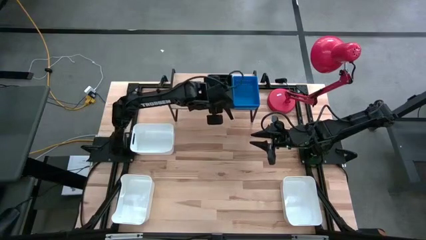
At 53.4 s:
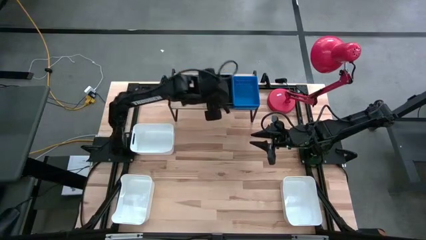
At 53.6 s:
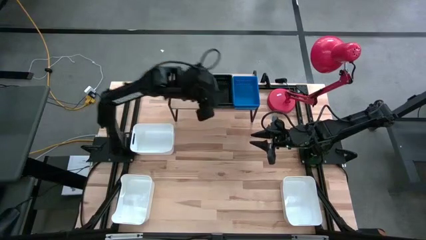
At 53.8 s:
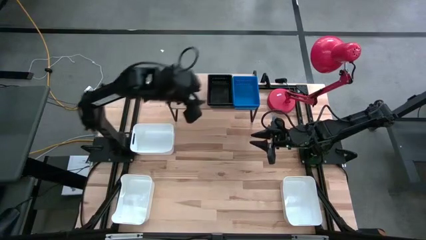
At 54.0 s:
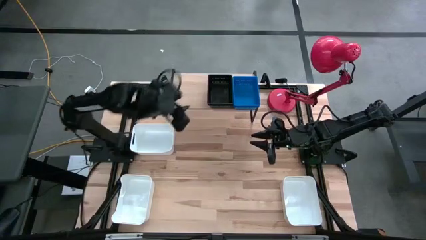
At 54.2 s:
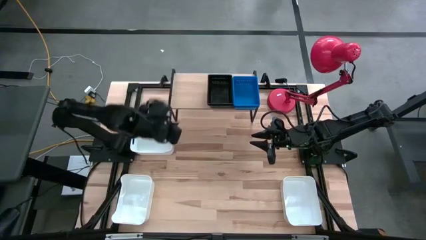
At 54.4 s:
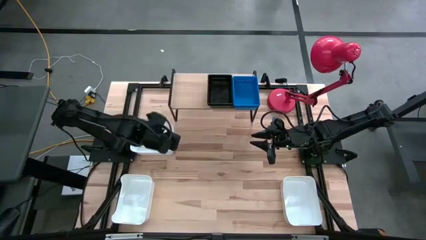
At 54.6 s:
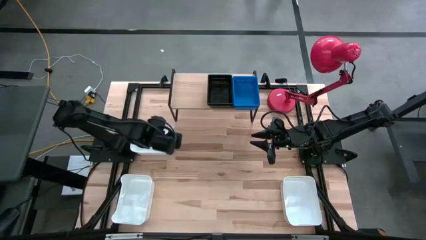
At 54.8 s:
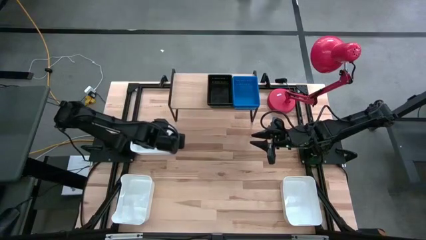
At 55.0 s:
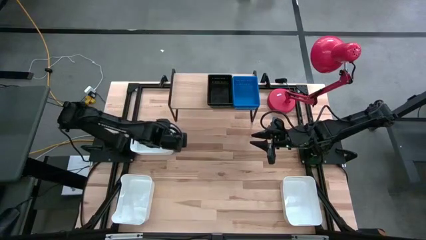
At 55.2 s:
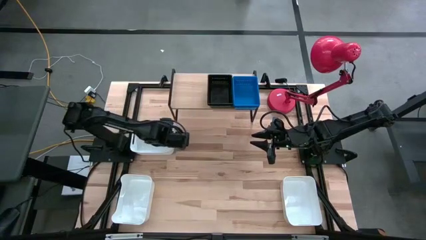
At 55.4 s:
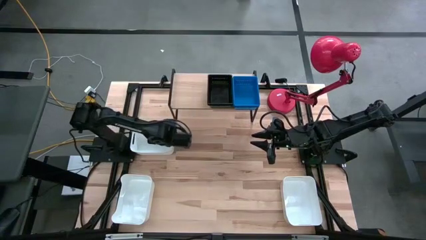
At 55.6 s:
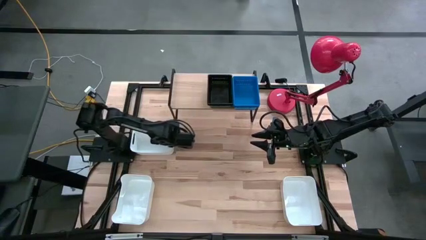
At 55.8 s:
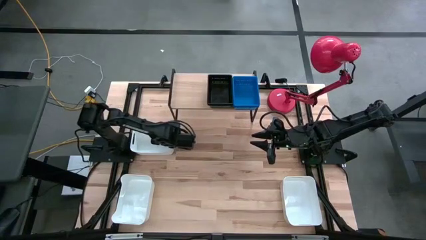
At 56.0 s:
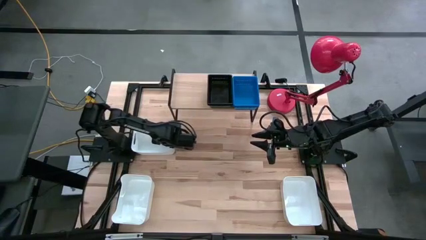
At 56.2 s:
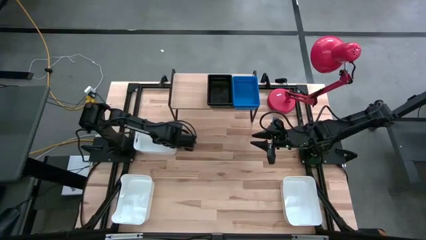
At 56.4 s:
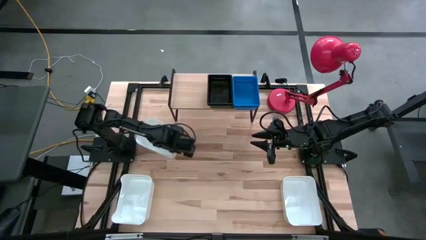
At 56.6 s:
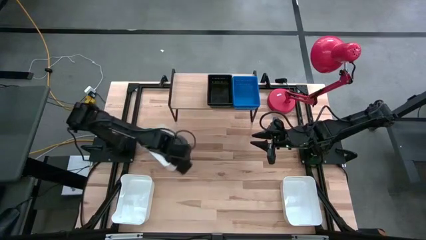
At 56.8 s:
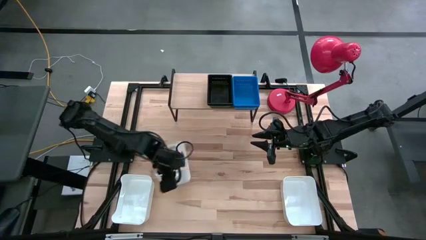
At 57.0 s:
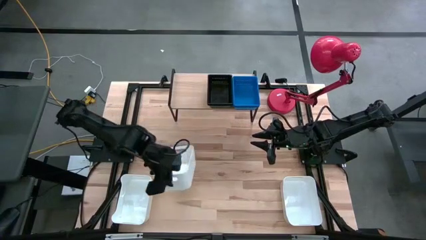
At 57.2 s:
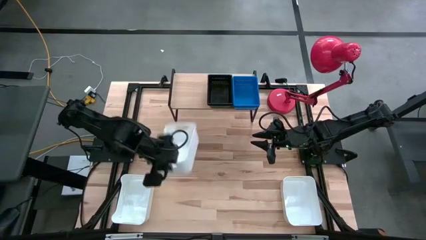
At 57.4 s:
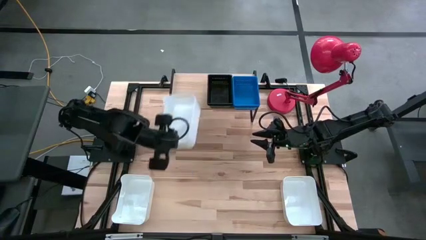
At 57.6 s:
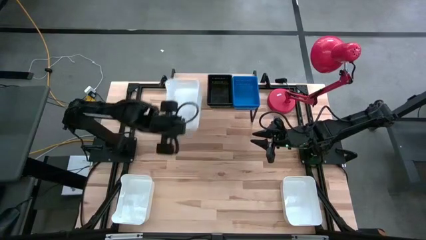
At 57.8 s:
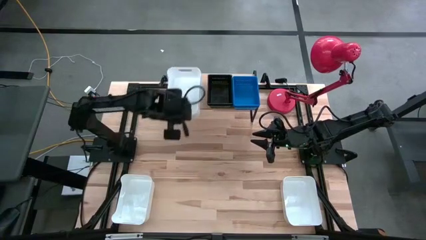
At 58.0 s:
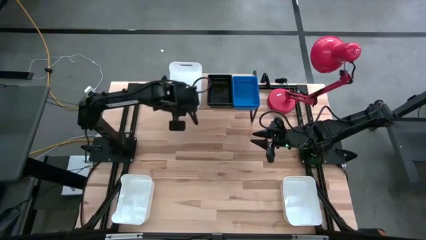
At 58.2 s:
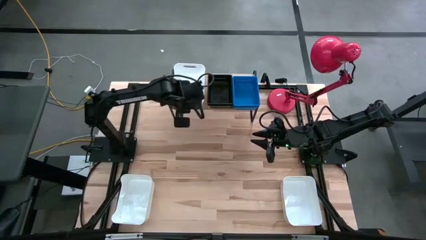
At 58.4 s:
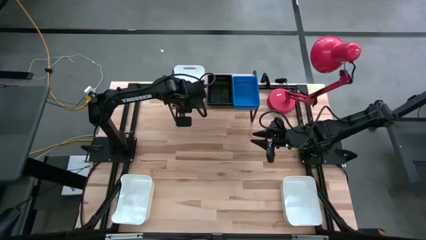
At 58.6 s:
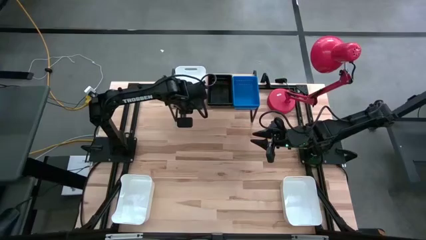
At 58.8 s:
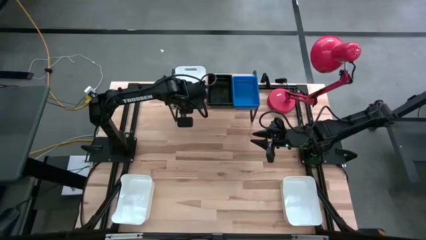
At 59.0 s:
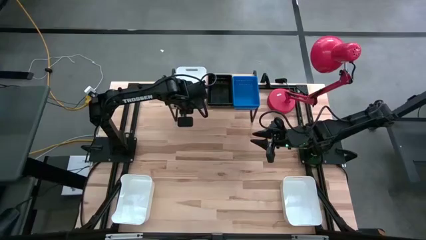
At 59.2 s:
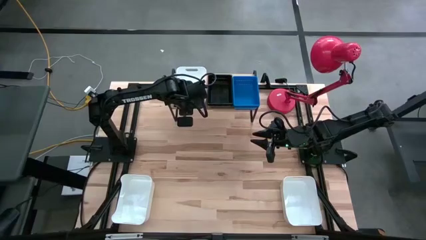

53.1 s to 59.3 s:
Task: Stack baskets on shelf by color
Put the top left white bin to the left on the shelf

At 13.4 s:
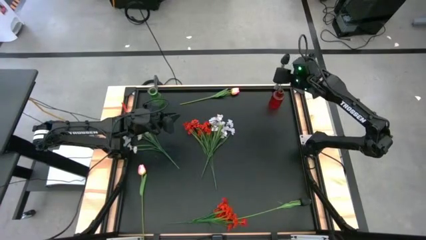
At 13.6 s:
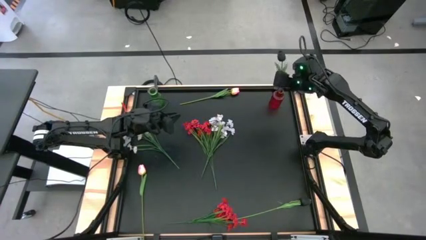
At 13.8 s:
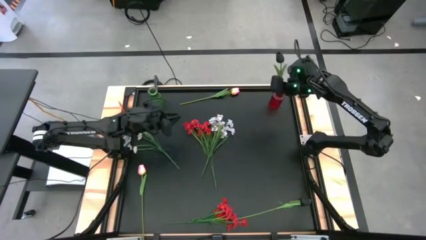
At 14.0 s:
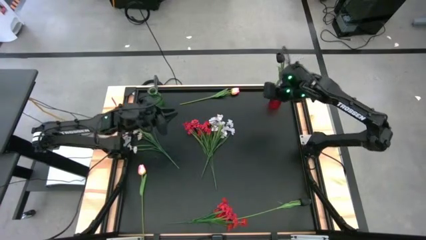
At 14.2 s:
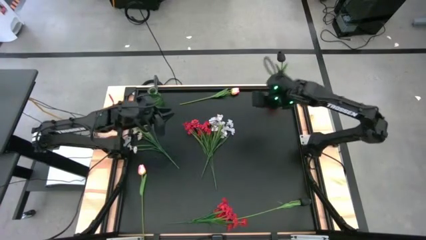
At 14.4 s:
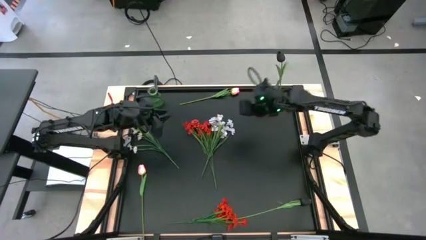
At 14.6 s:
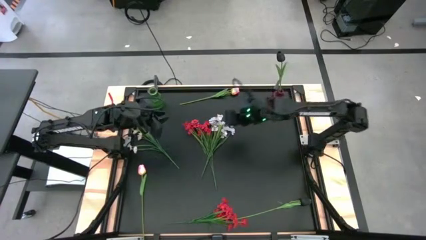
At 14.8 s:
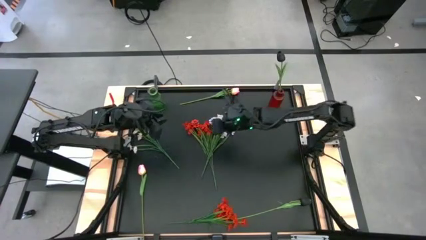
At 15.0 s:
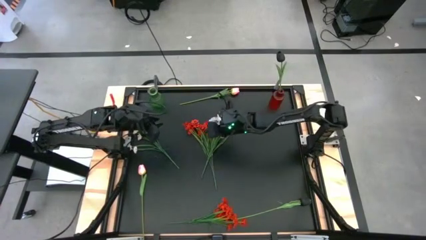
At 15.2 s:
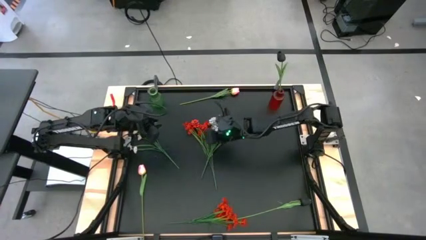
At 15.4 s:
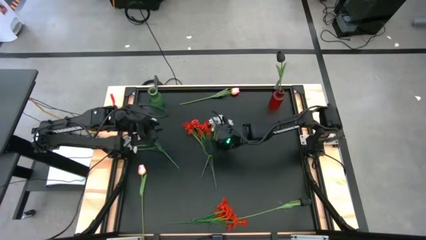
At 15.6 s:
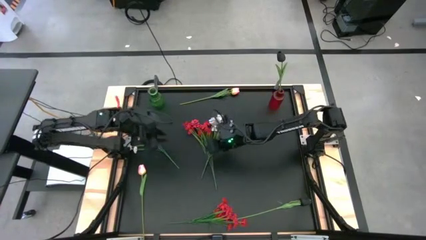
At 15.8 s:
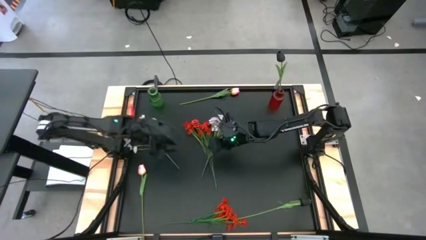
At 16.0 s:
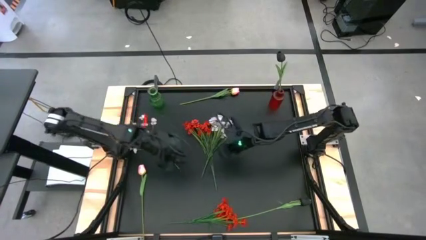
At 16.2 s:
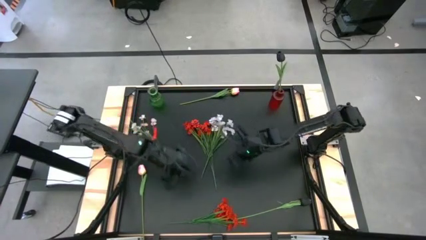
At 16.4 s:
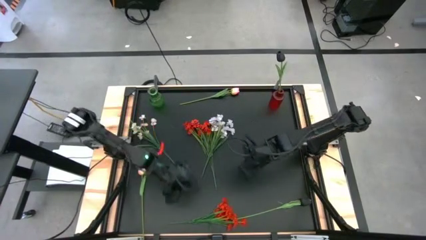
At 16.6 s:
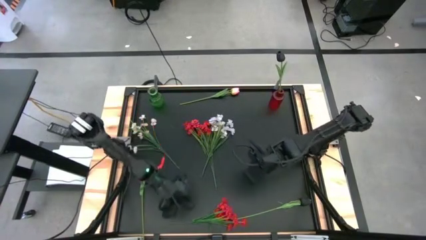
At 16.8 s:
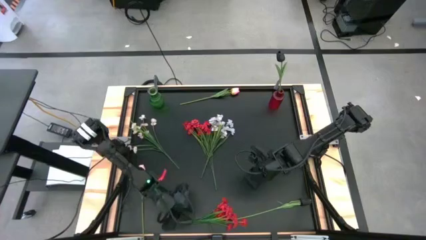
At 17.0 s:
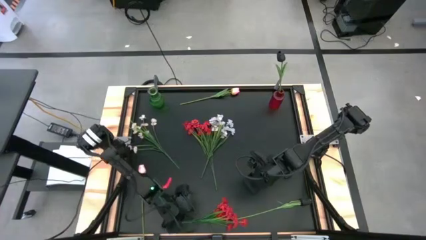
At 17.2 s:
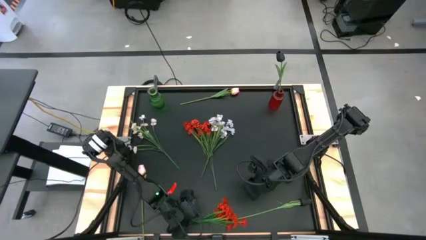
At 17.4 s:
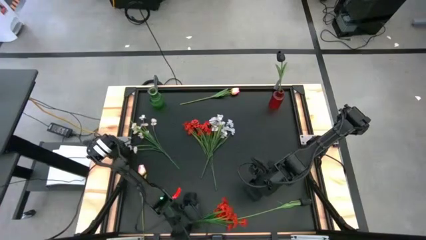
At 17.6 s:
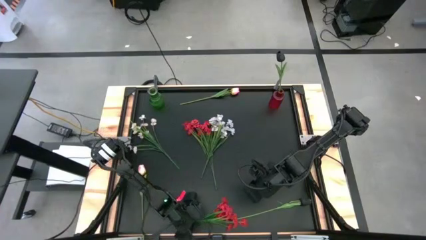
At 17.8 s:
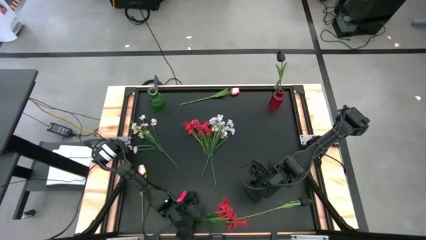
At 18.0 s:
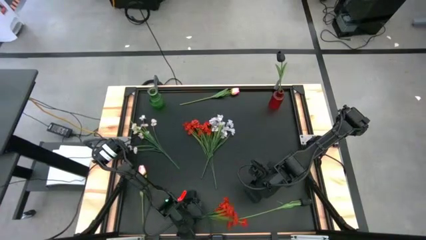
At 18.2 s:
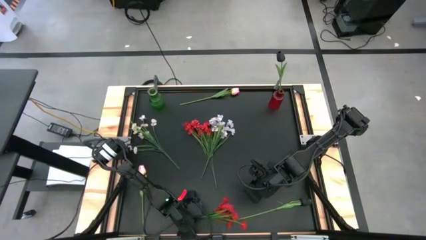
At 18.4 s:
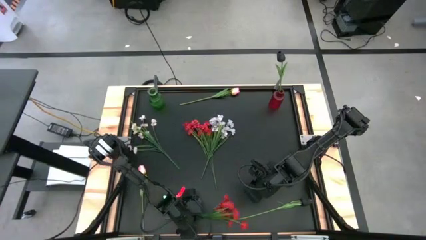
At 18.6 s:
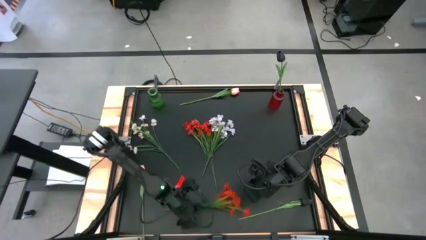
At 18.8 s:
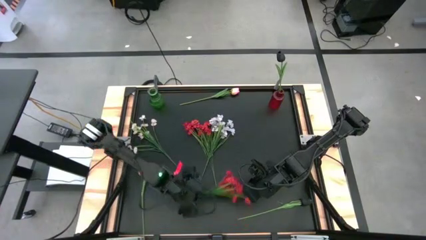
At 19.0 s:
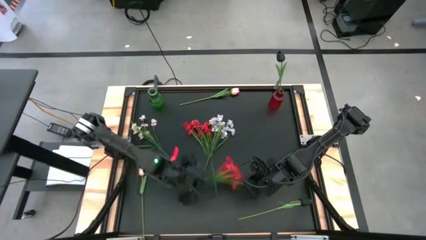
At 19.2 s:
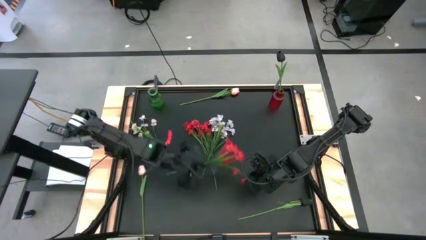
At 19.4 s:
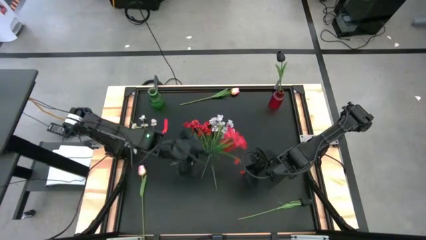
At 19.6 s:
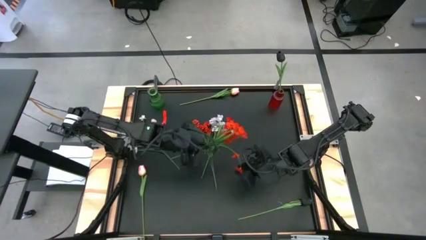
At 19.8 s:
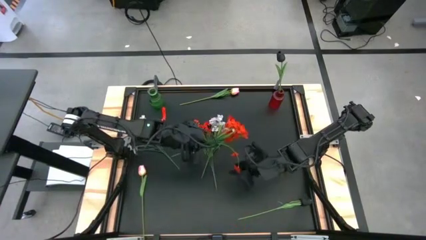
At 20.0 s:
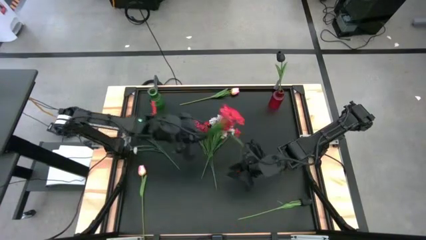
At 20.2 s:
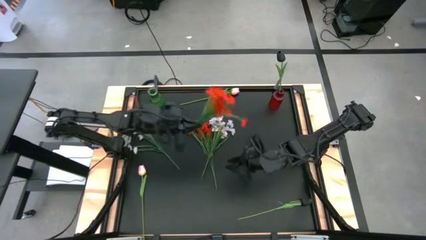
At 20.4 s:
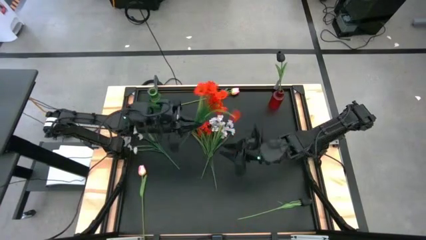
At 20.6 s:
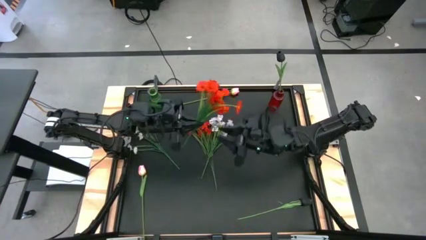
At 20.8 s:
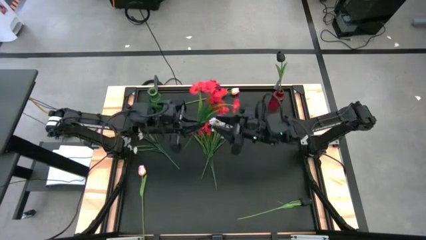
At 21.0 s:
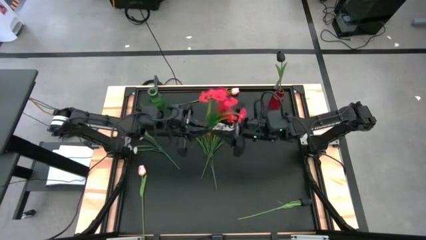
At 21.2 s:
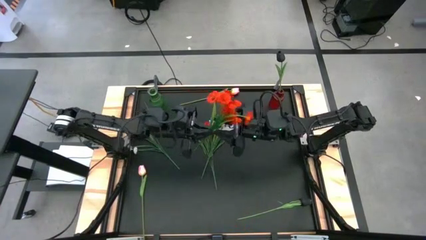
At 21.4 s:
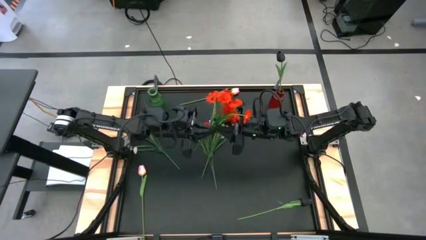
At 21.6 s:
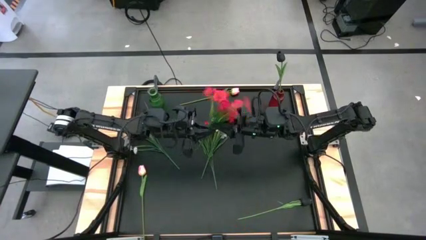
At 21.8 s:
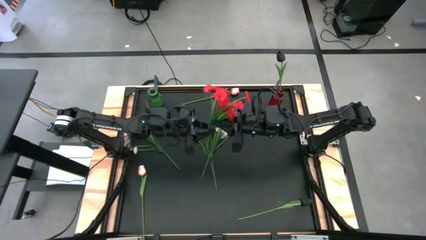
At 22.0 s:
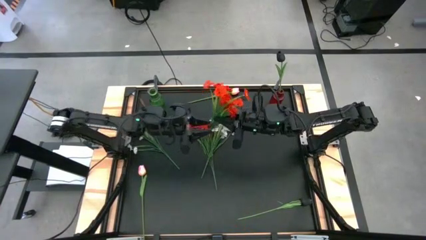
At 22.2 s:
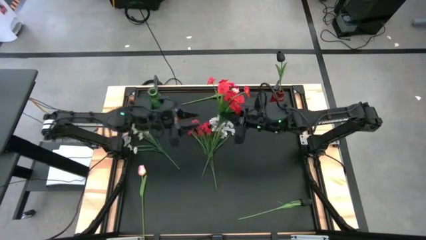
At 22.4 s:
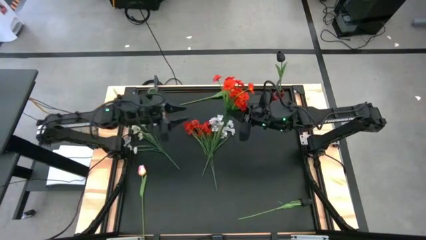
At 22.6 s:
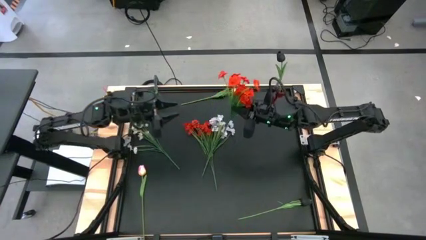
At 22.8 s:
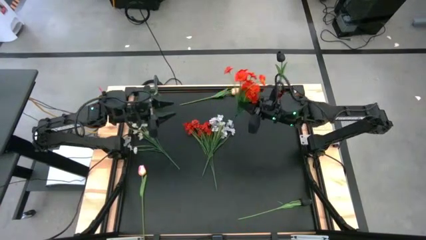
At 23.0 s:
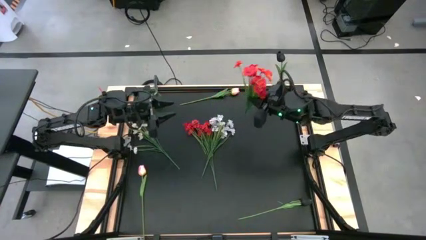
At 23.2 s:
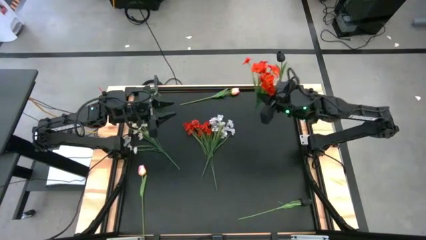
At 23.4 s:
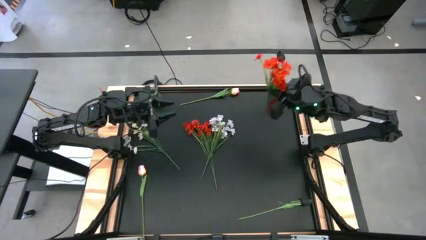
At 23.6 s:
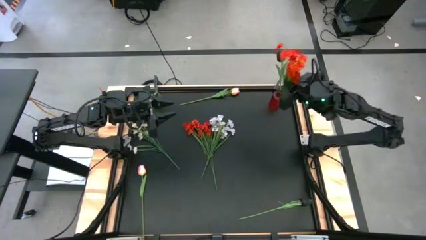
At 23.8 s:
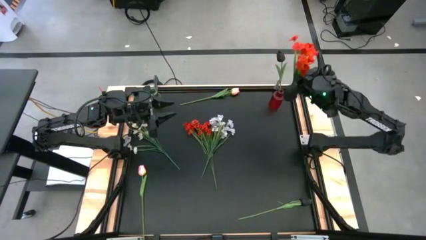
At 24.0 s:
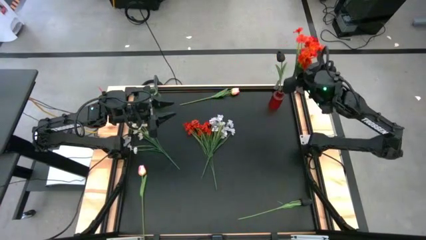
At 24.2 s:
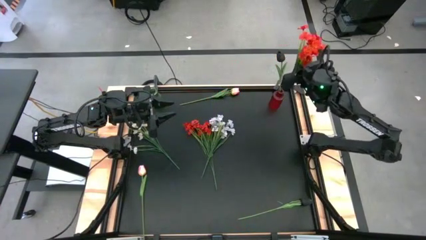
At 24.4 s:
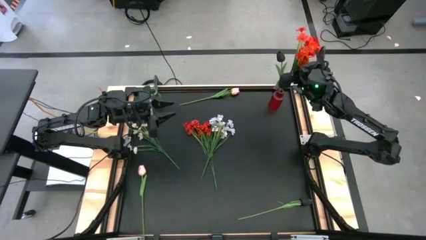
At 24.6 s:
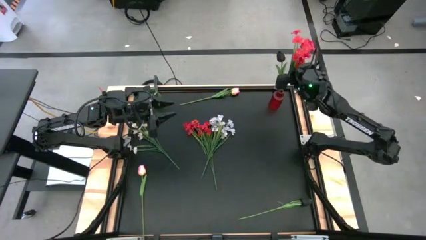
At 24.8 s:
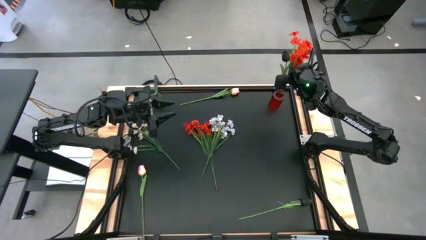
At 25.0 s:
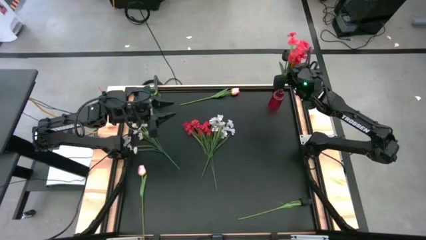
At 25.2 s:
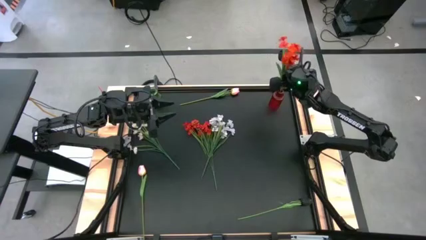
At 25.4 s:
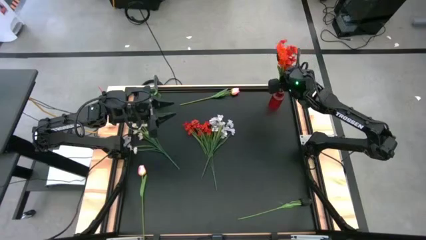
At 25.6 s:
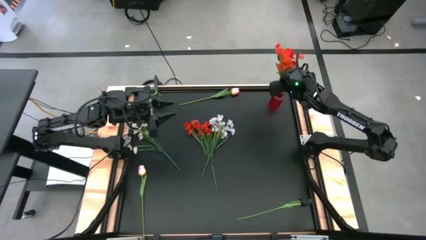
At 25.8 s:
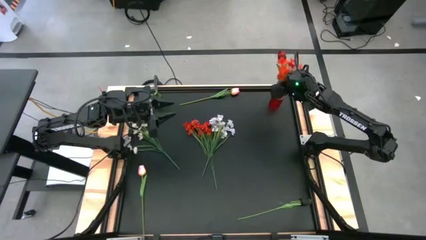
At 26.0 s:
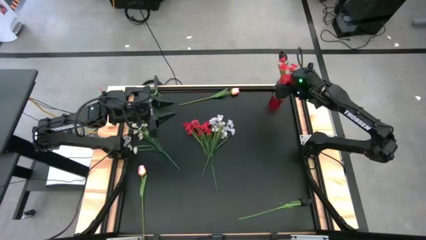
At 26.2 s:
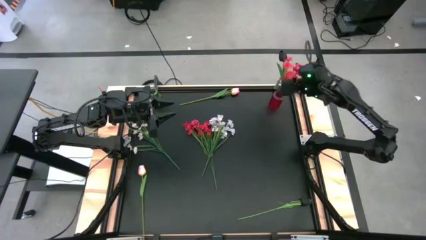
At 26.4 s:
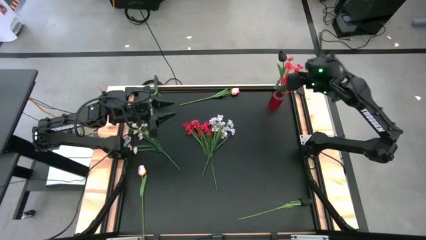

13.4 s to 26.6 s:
Task: Sort flowers into vase by color
Put the bottom red flower into the red flower vase
